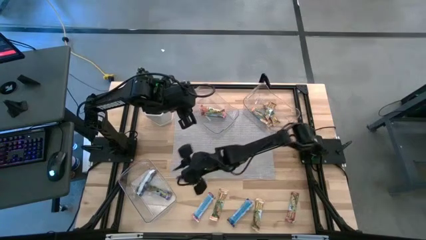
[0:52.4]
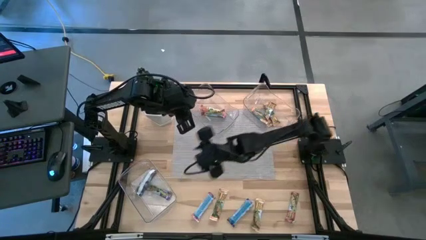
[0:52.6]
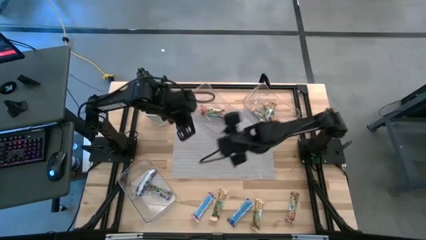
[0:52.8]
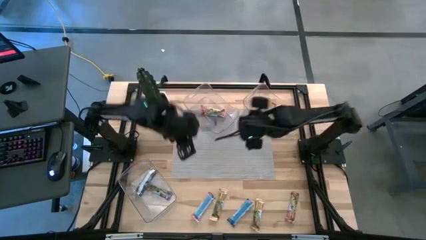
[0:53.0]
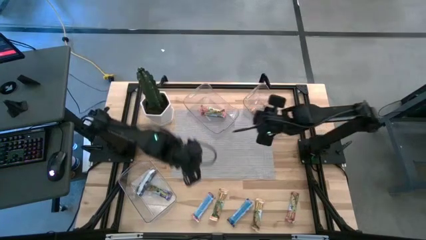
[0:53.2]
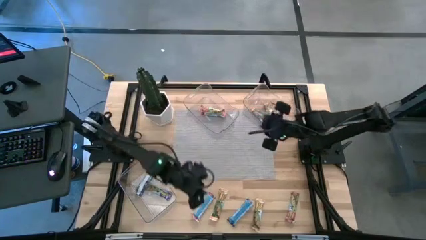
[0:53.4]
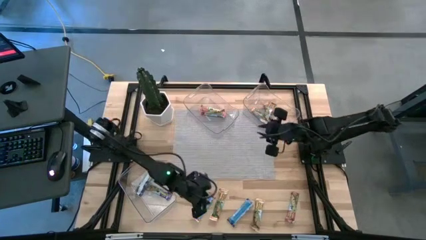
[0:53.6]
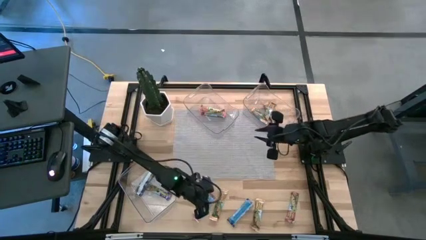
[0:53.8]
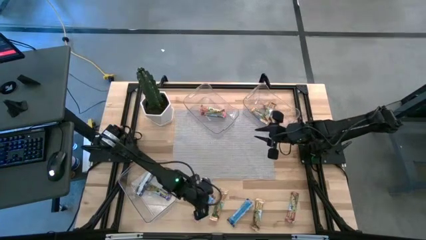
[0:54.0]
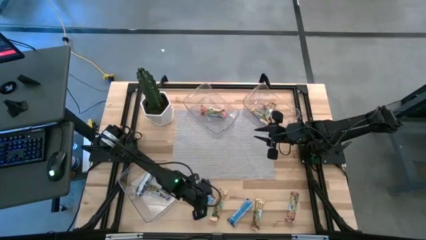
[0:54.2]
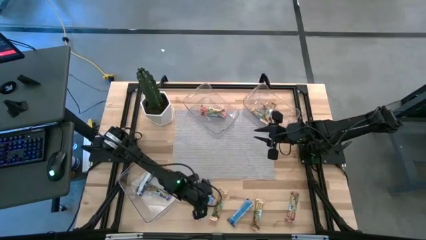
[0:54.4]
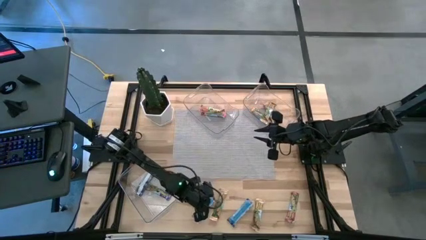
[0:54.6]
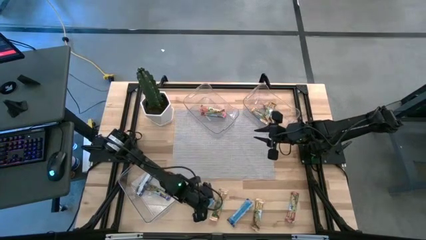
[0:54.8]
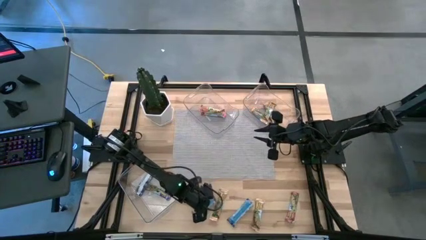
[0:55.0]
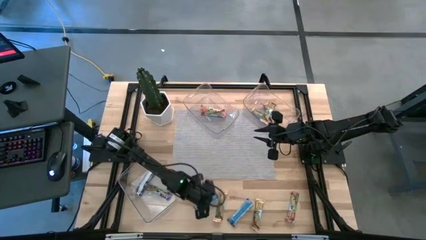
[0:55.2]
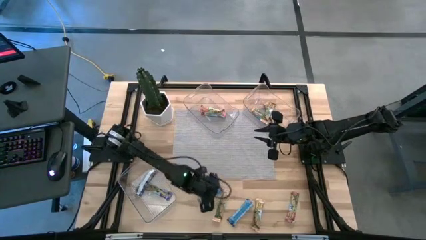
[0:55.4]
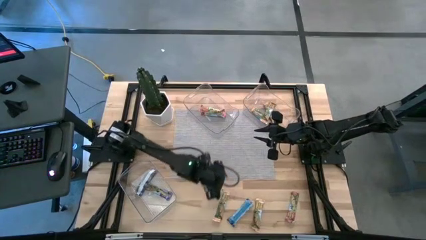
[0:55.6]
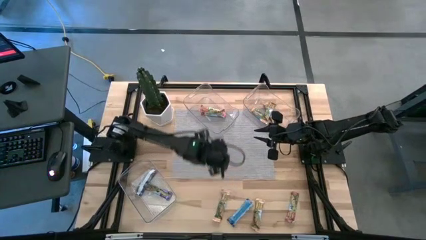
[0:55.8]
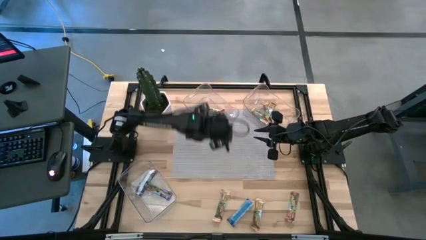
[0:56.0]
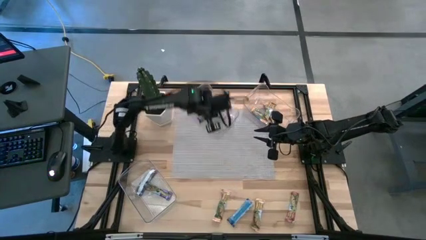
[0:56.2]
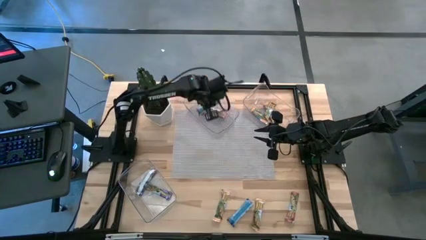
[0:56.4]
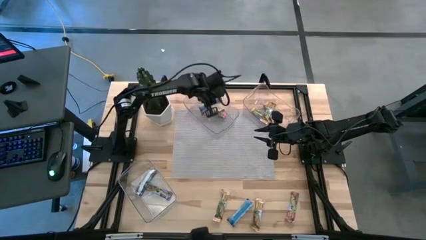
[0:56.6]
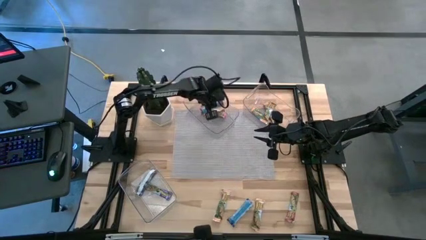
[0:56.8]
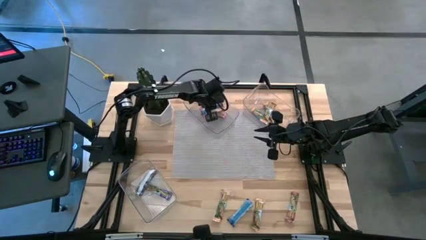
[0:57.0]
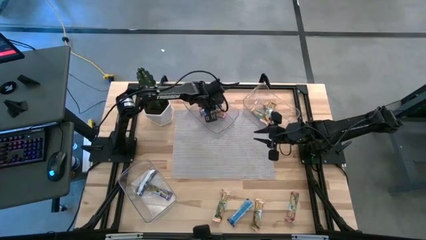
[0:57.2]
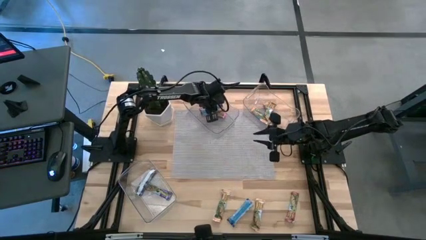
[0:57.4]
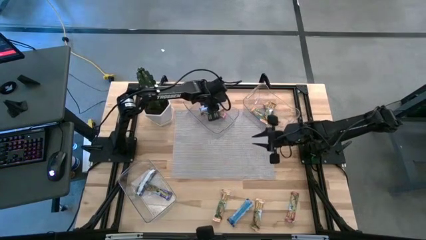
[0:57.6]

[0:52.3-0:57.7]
Task: Pick and place Granola Bars by type
Put the red granola bar into the top left transparent bin

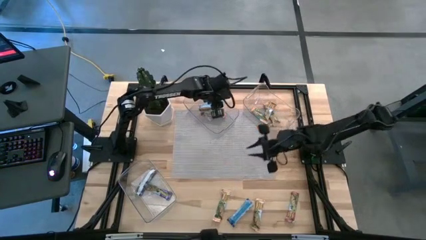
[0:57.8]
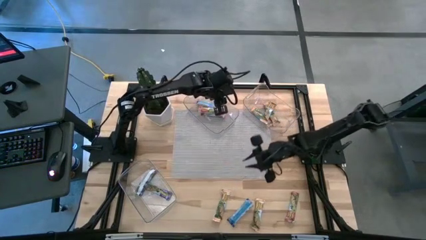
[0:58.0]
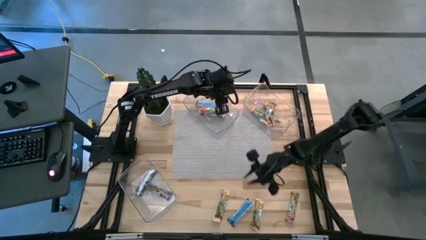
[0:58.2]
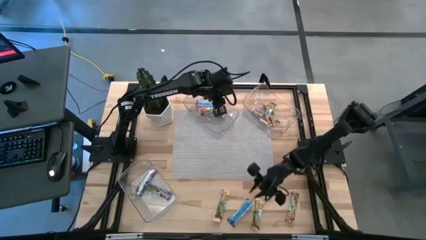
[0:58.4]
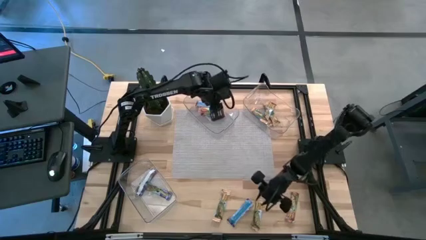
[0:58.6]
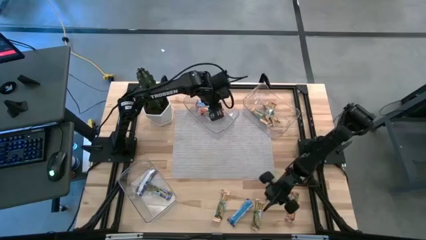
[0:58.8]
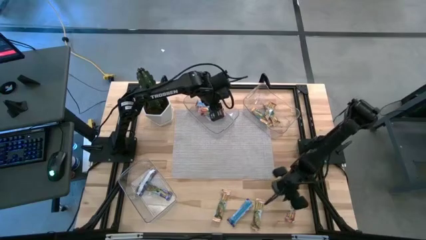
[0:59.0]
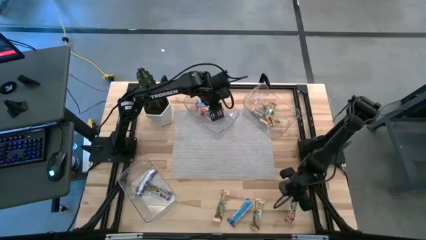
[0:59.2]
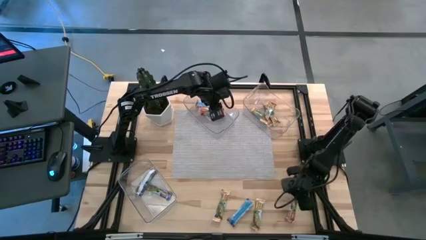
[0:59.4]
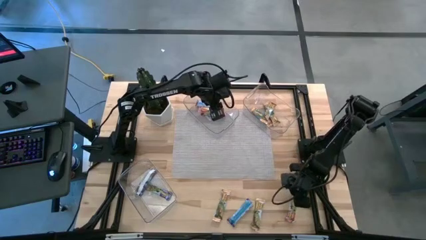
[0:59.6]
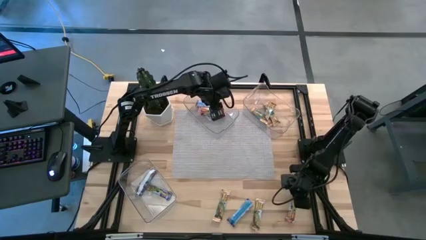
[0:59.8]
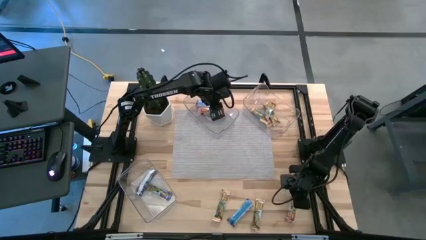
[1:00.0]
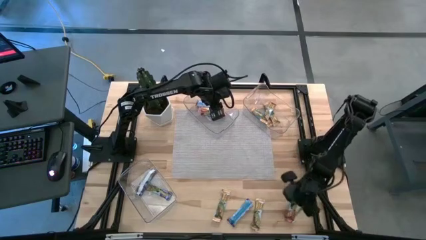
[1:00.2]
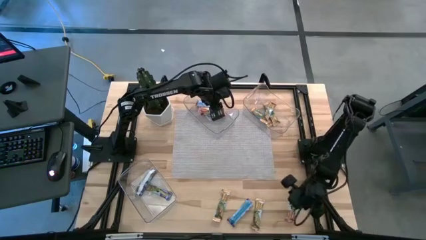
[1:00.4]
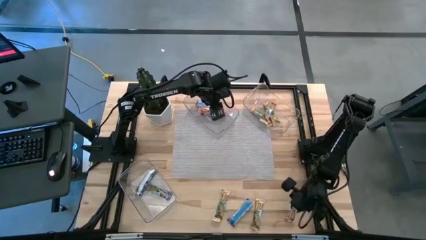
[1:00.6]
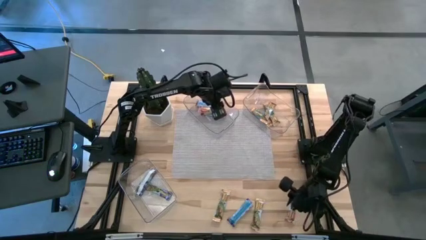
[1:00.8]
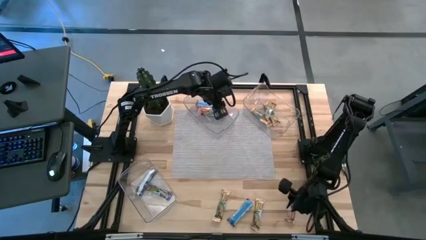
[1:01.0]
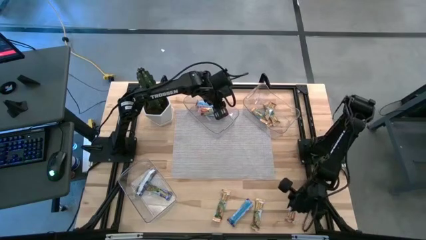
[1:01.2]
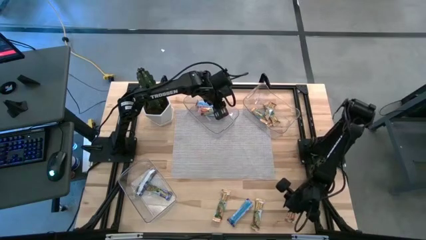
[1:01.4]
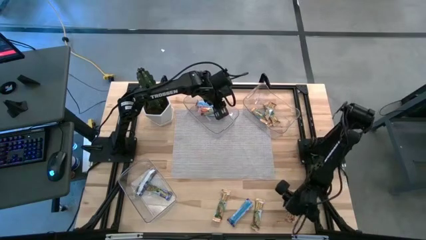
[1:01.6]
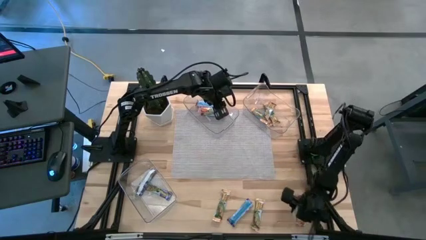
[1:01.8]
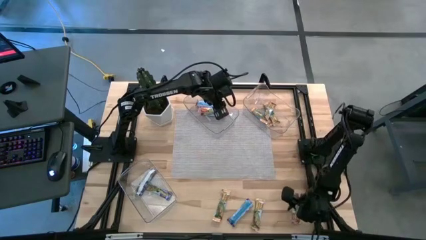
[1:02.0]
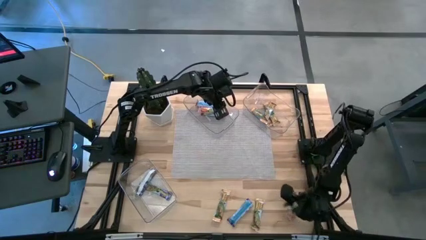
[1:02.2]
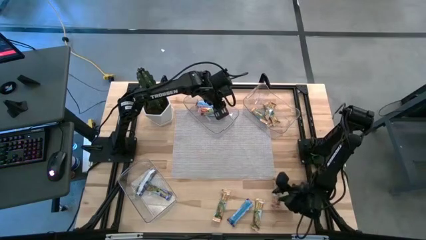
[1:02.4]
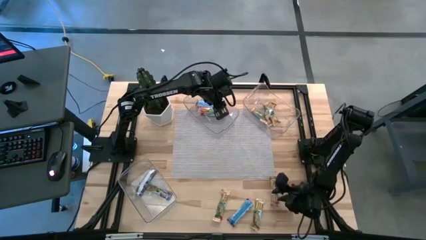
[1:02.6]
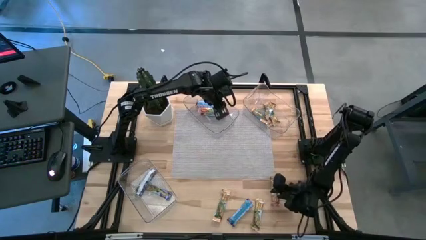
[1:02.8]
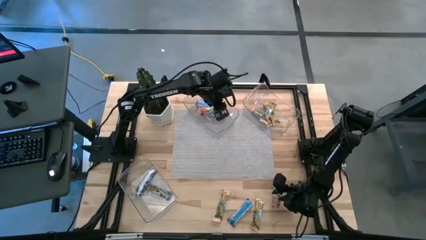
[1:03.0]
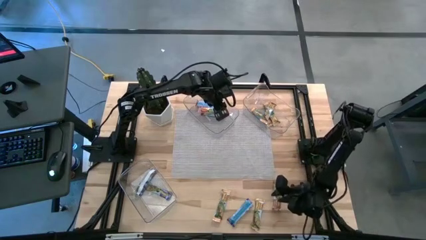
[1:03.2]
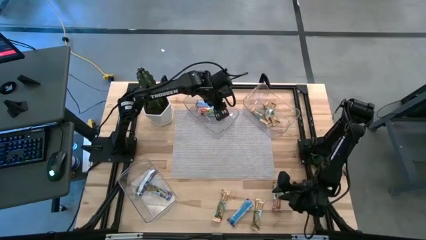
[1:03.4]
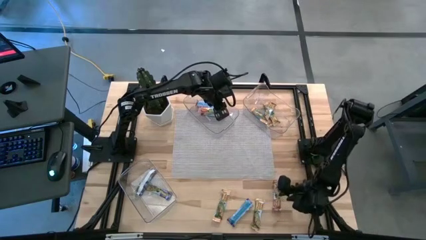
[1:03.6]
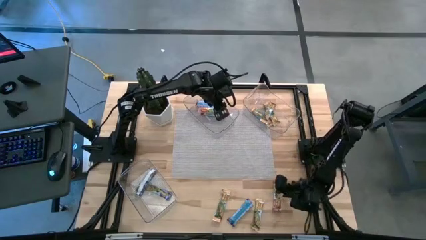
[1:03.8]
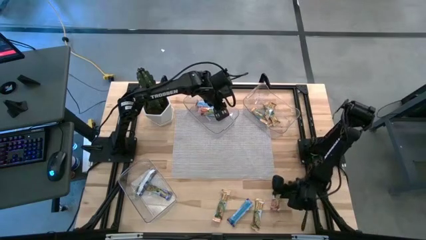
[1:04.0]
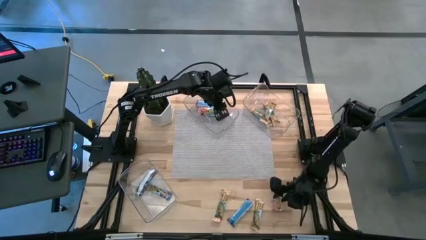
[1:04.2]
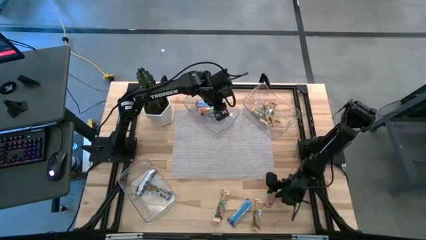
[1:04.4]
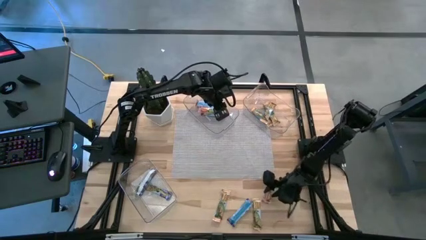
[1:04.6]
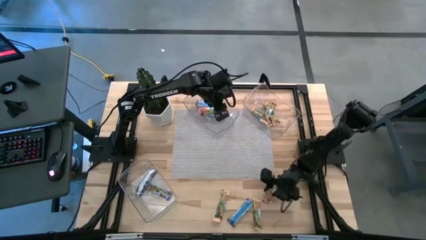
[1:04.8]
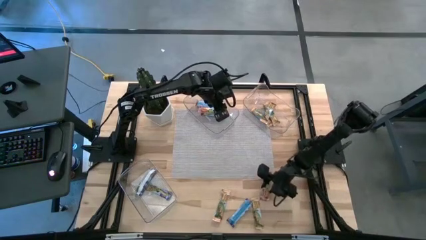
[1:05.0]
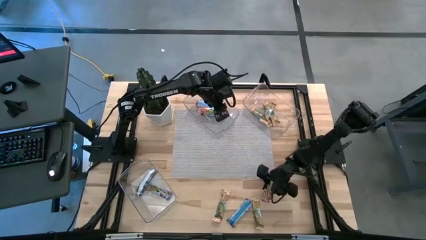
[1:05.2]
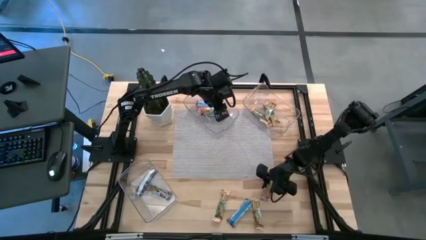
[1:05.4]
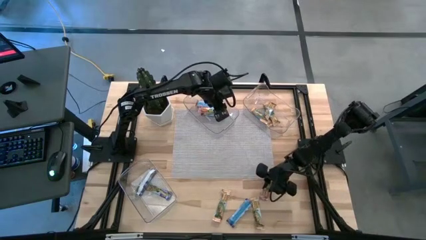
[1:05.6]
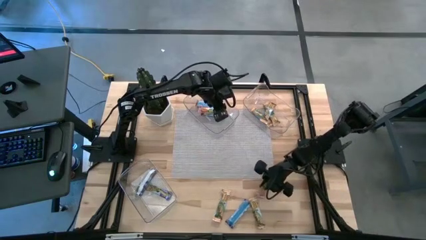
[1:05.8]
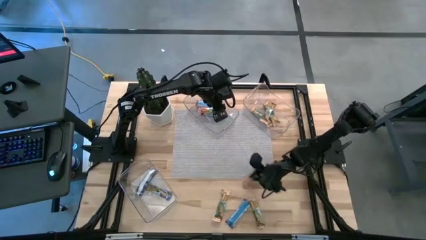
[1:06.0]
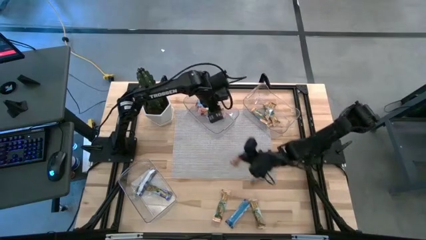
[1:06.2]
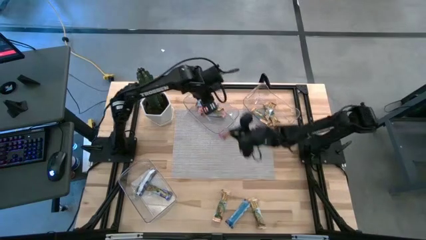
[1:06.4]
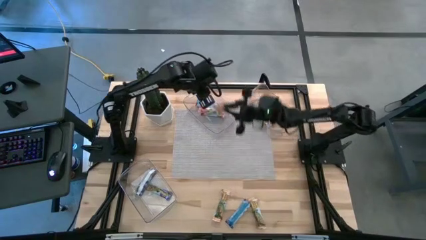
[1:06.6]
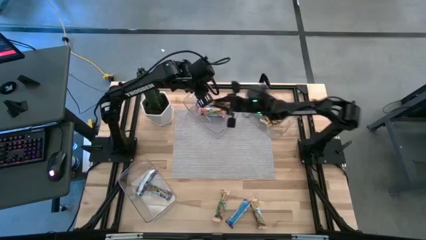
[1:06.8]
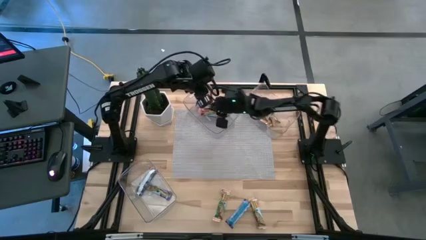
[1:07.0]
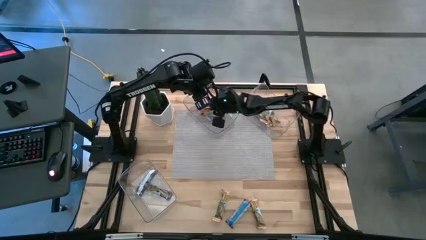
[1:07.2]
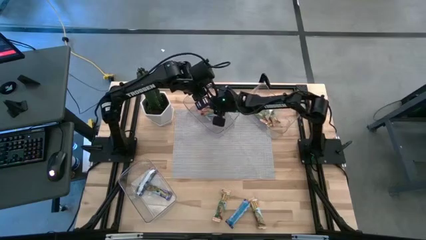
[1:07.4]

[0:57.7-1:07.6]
Put the red granola bar into the top left transparent bin

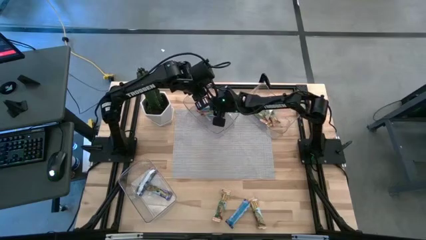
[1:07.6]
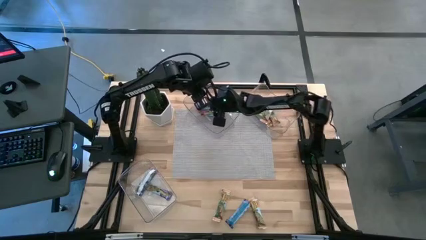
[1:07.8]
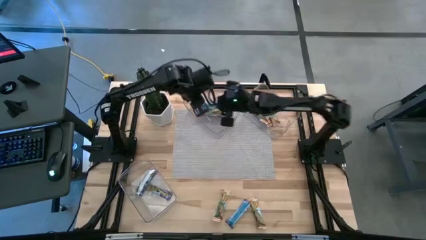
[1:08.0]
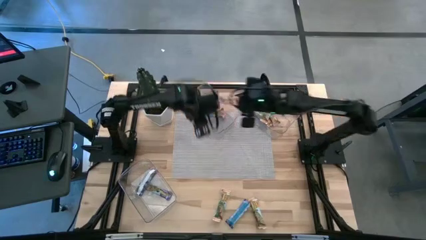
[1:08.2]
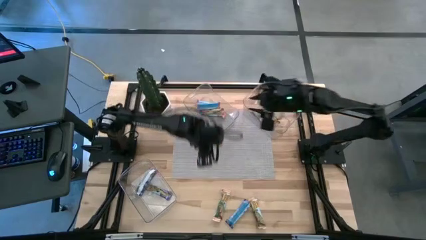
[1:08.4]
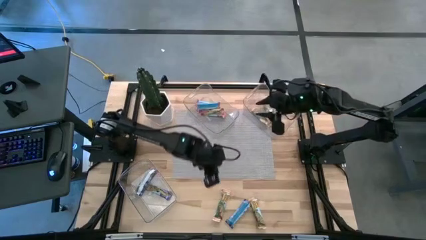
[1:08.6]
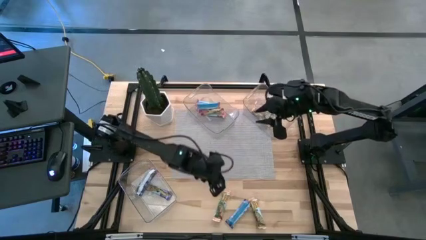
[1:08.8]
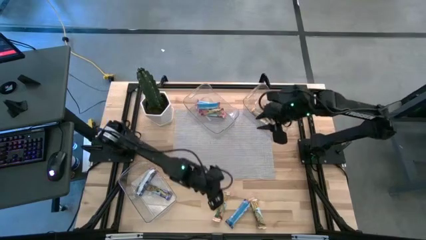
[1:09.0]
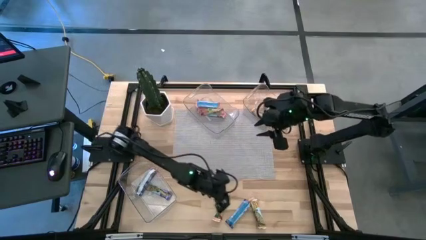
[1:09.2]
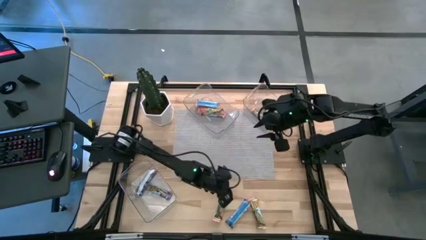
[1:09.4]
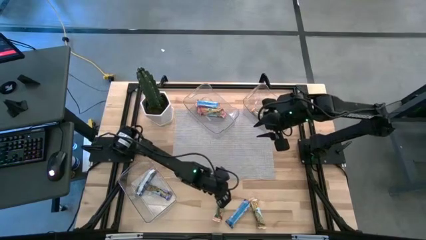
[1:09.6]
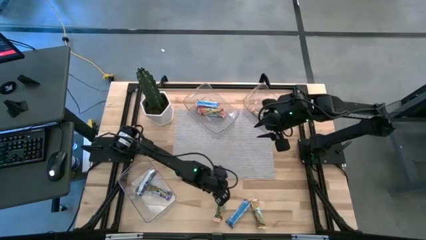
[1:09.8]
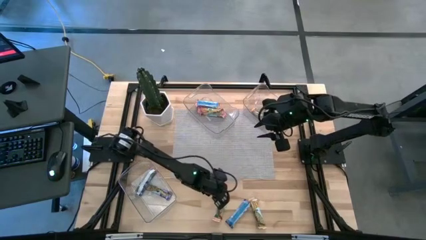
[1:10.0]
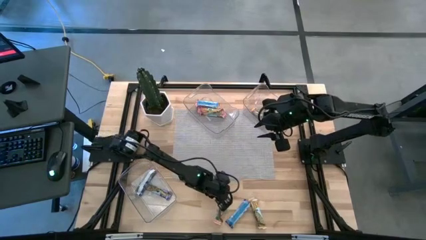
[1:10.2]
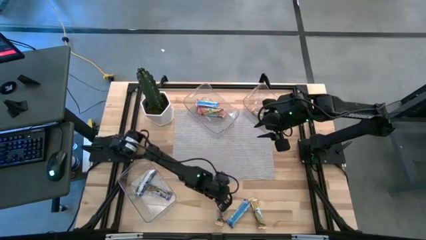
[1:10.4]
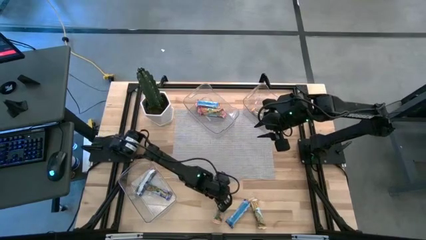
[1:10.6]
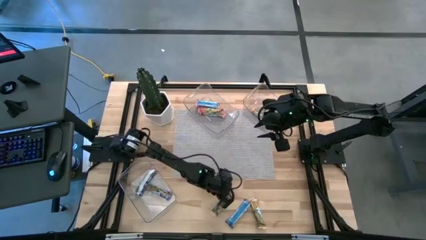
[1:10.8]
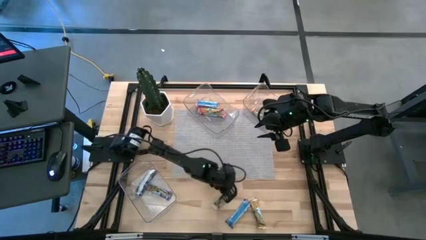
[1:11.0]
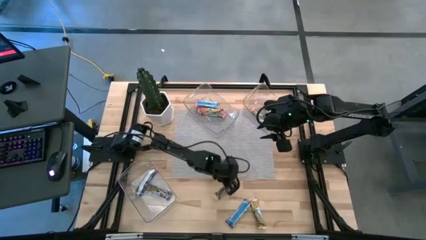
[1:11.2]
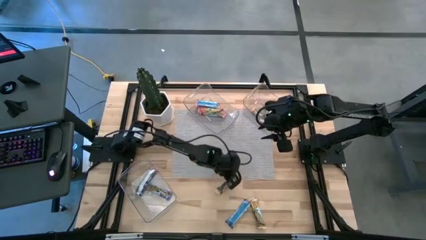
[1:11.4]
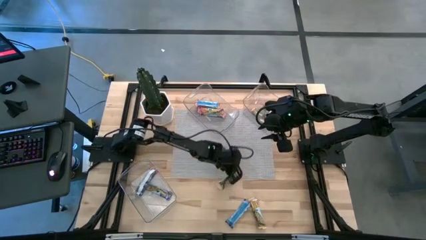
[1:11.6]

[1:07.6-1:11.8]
Put the yellow granola bar into the top right transparent bin
